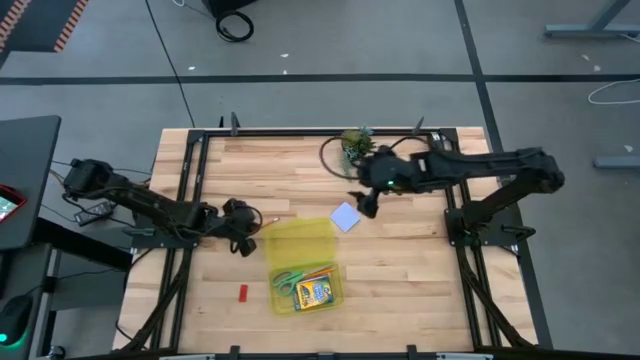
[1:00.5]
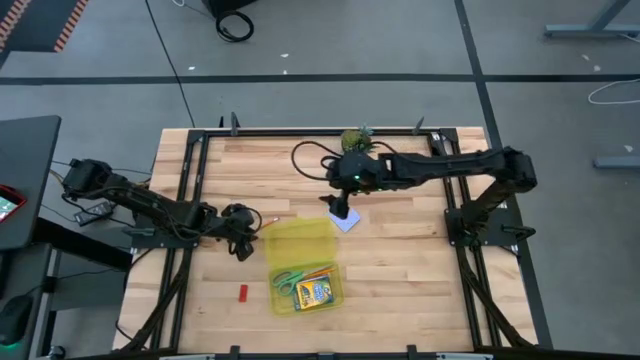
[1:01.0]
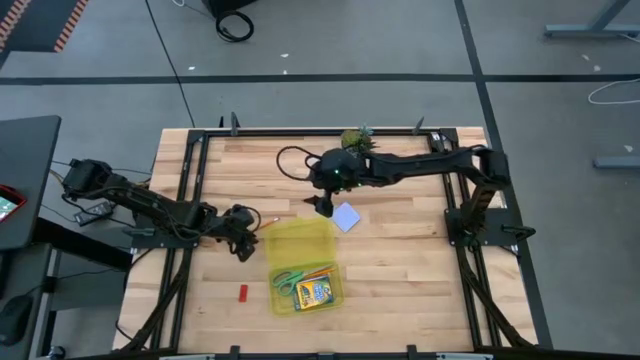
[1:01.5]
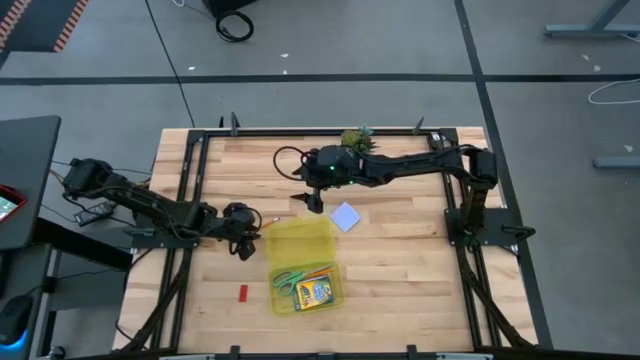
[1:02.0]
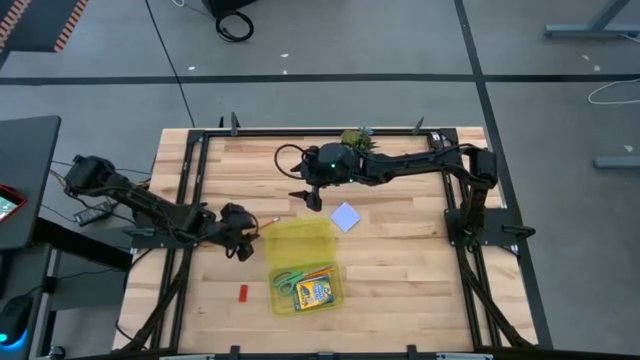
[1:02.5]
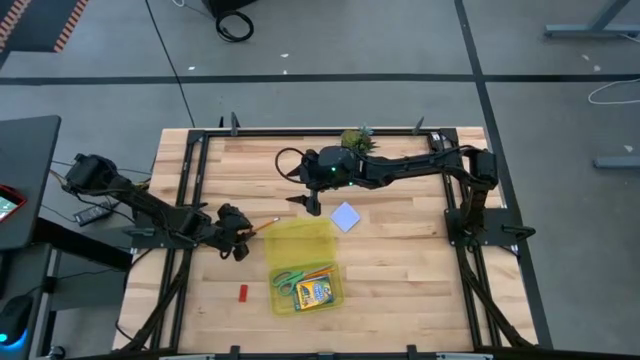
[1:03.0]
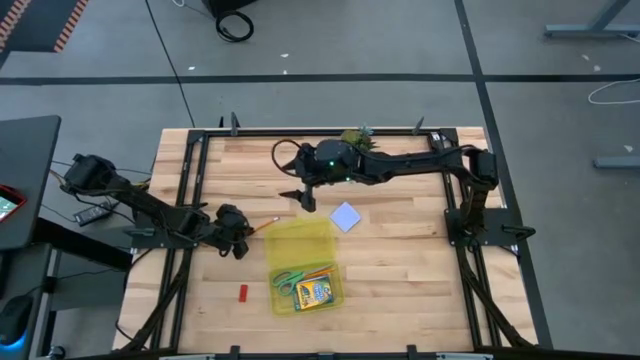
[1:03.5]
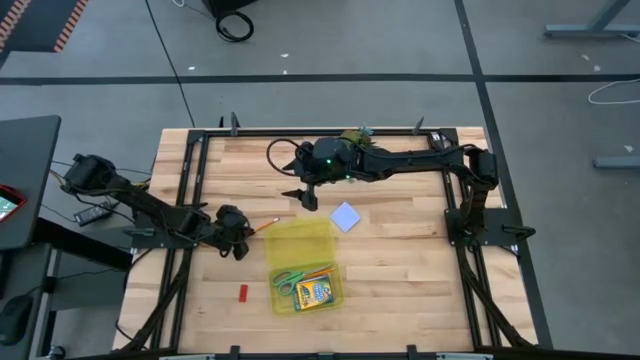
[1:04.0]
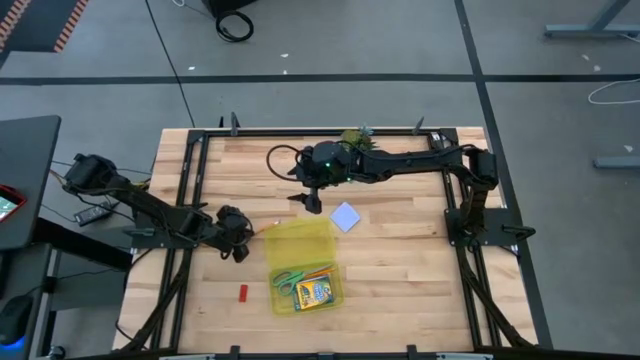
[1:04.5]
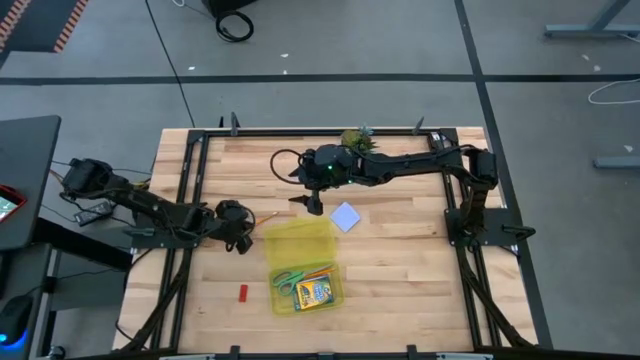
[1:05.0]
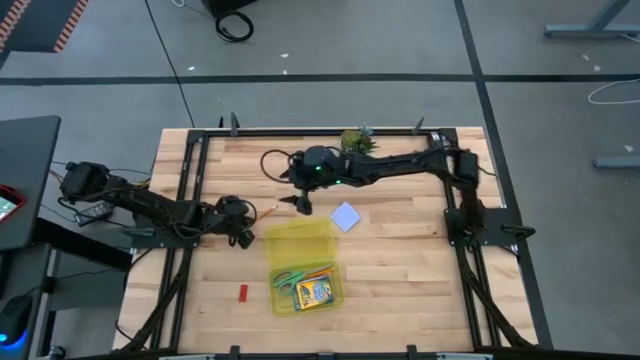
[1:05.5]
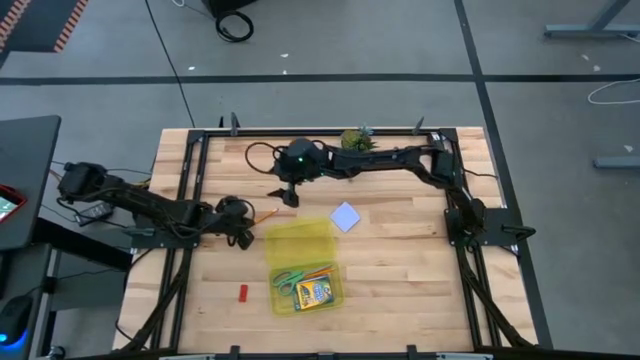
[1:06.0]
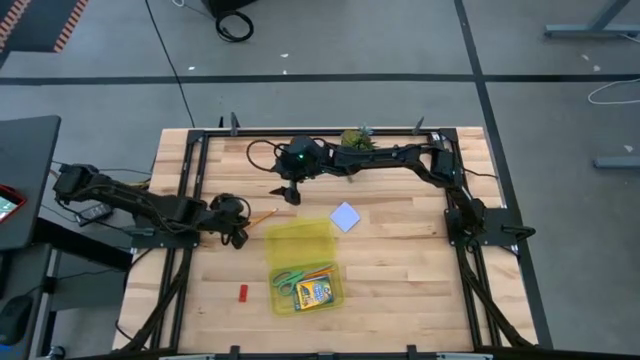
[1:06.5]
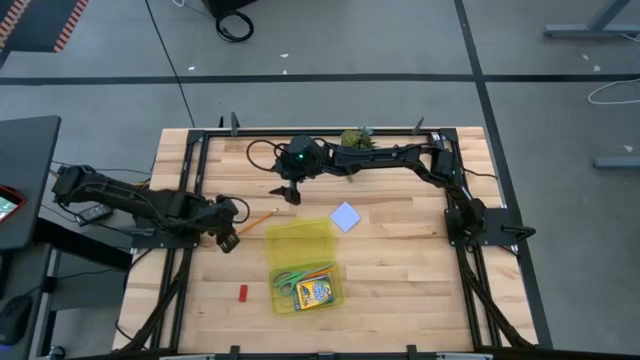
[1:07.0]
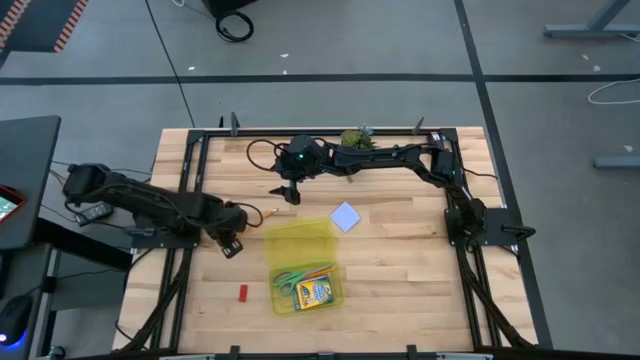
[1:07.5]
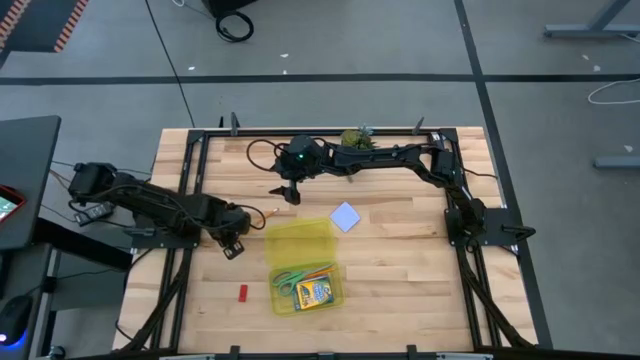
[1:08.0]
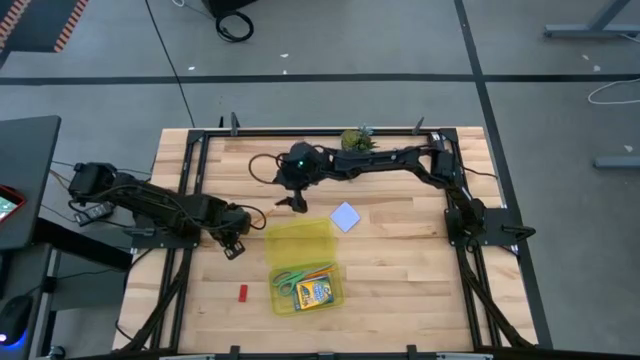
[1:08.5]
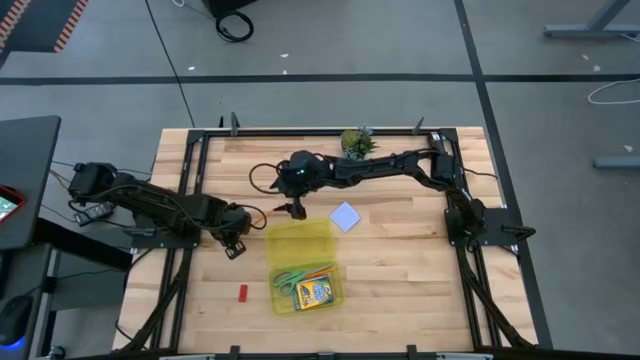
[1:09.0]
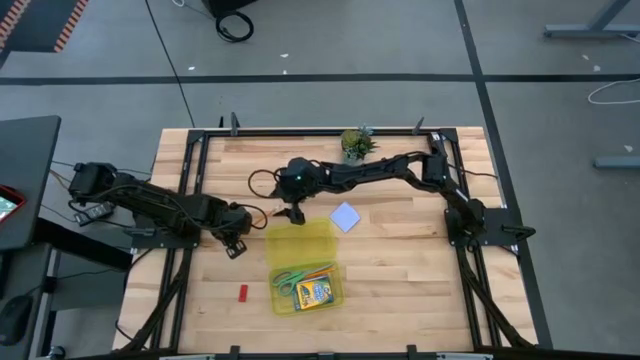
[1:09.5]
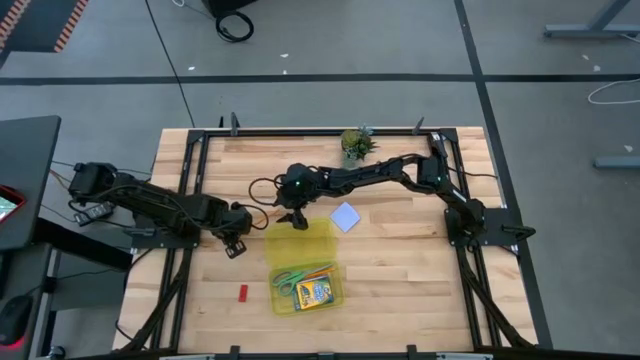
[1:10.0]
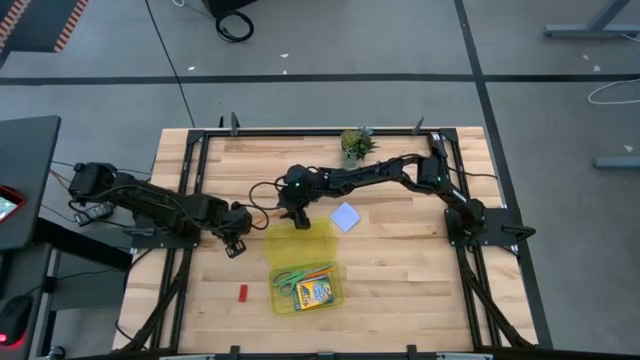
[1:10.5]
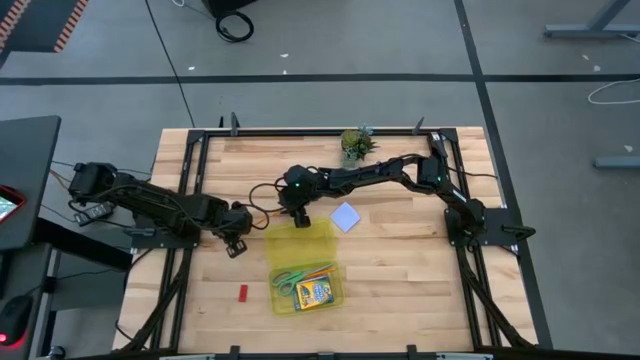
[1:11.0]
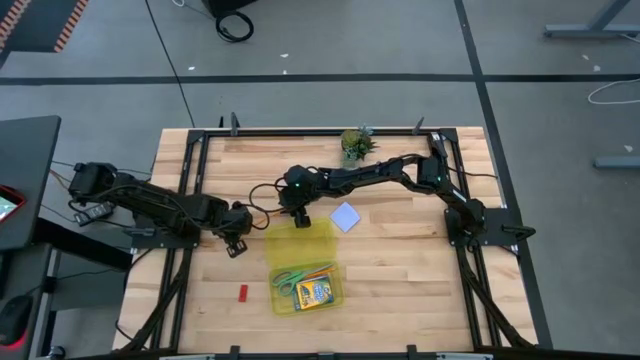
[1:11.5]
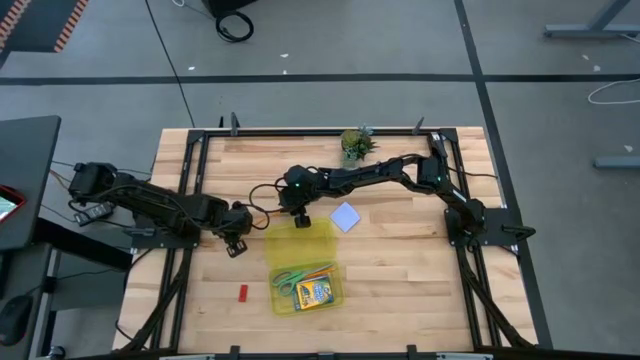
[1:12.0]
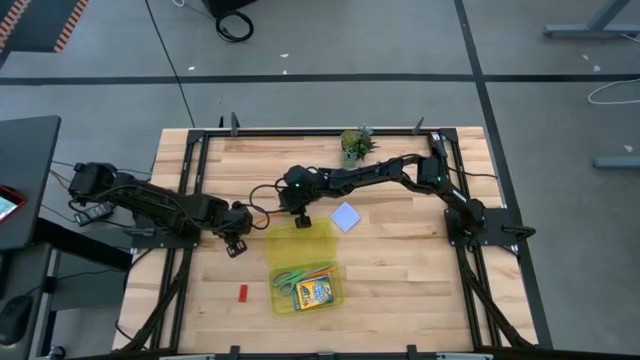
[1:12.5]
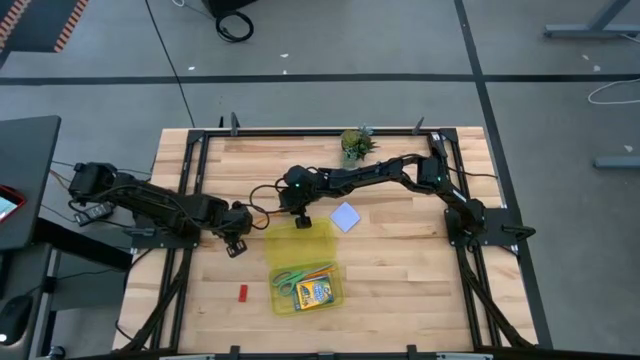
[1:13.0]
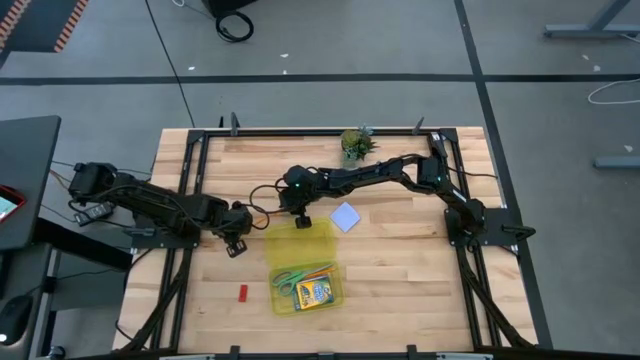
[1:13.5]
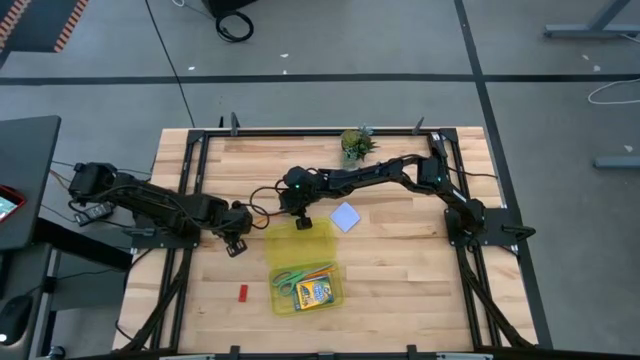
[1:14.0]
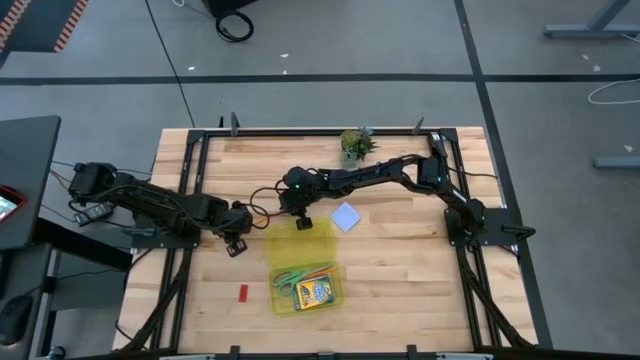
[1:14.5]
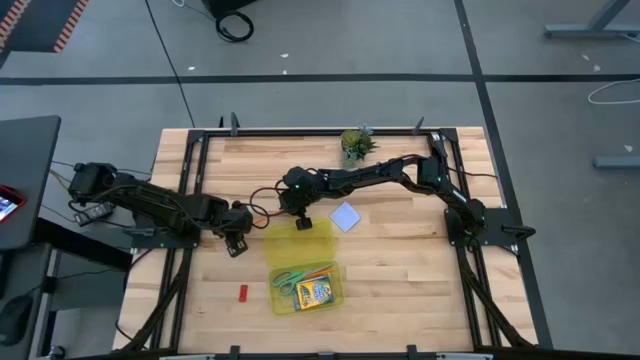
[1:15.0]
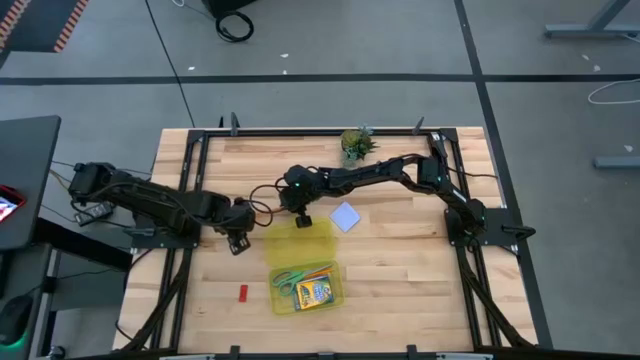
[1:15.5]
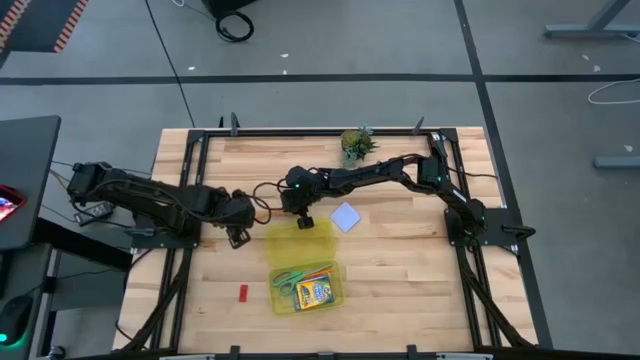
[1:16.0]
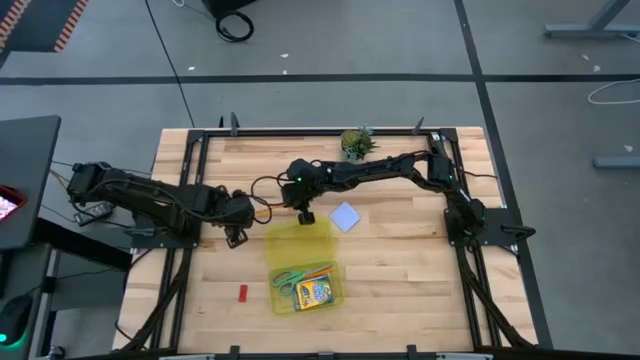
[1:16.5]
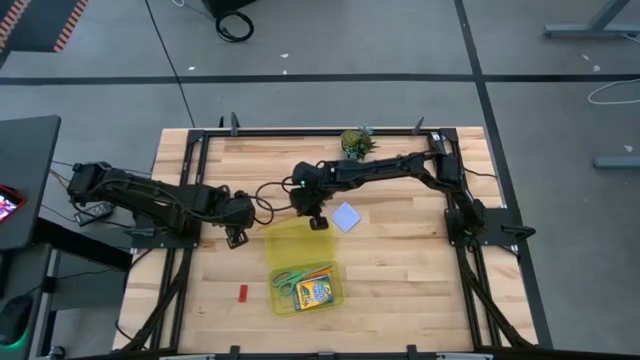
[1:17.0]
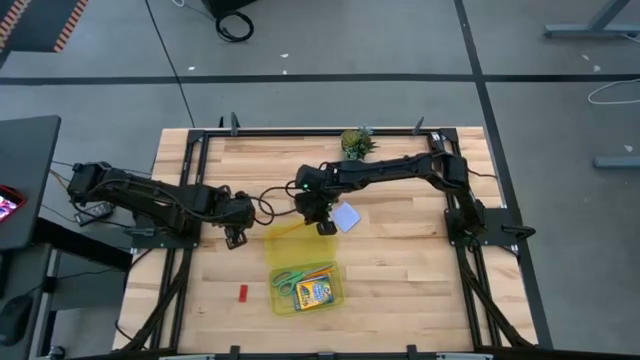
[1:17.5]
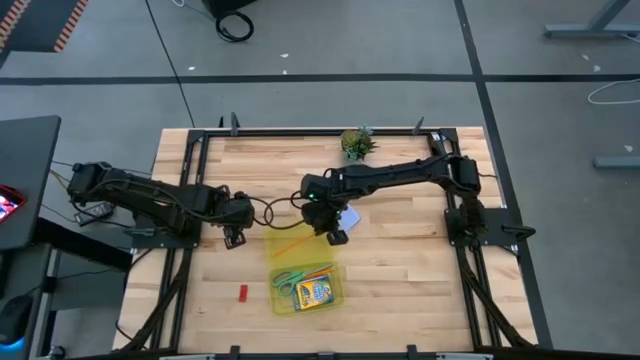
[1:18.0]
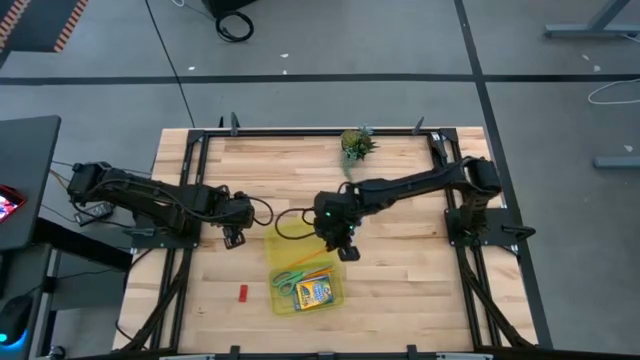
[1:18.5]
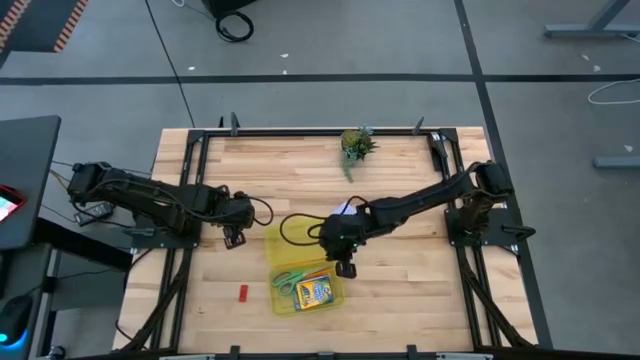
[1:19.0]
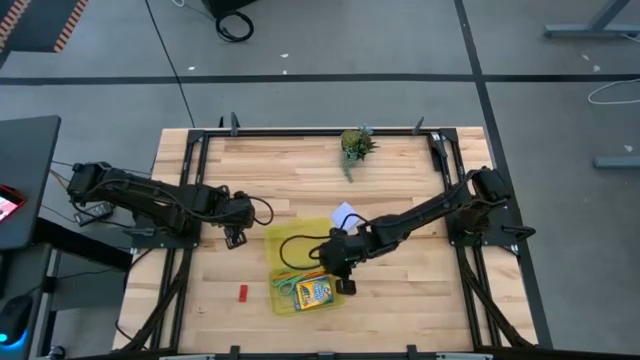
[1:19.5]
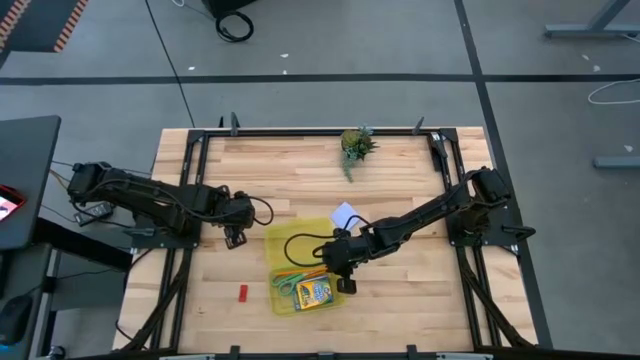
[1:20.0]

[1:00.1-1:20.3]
Task: Pack school essentials
Put the orange pencil into the yellow supply box
